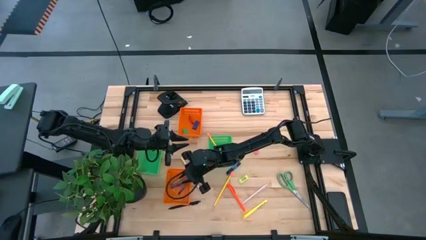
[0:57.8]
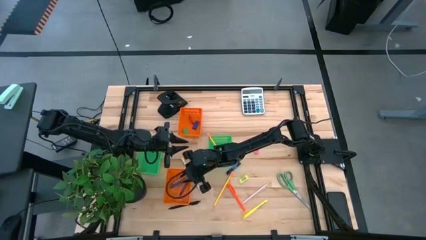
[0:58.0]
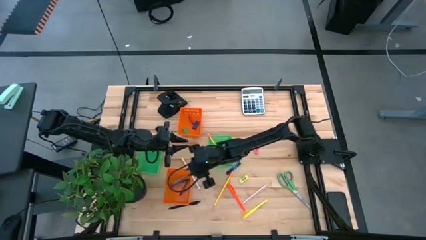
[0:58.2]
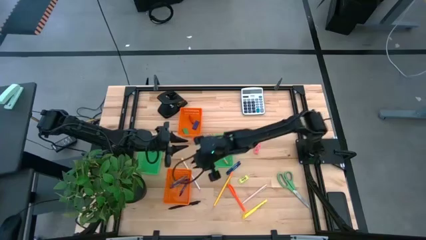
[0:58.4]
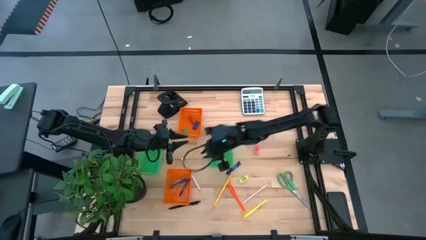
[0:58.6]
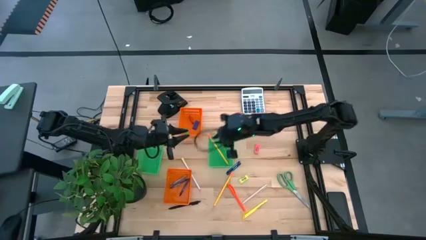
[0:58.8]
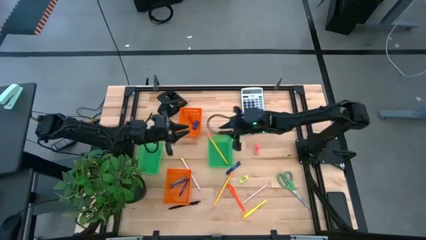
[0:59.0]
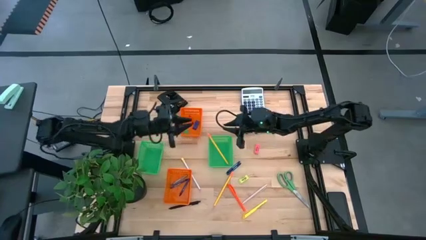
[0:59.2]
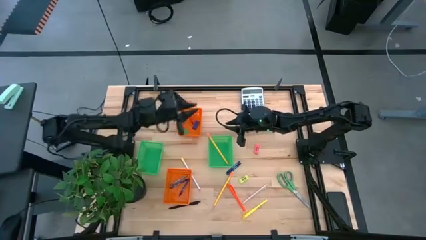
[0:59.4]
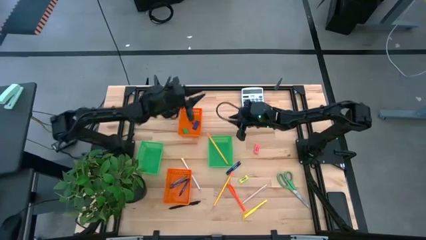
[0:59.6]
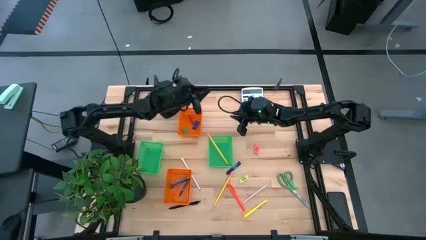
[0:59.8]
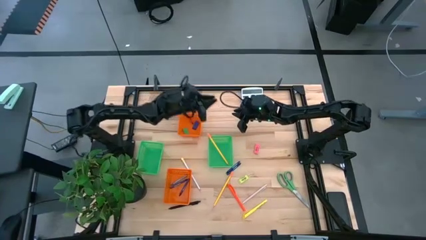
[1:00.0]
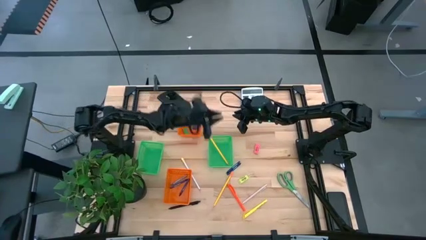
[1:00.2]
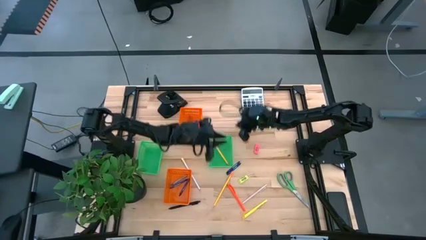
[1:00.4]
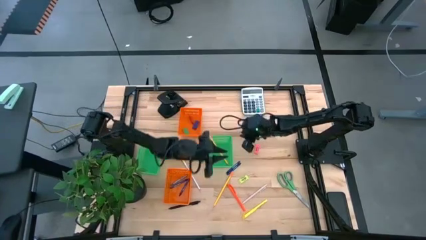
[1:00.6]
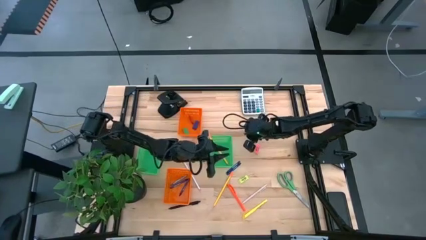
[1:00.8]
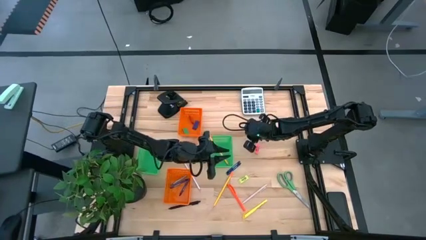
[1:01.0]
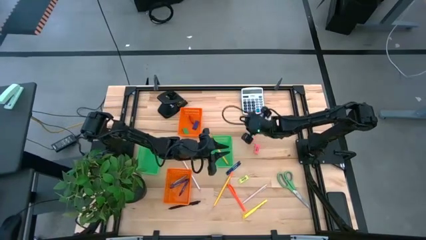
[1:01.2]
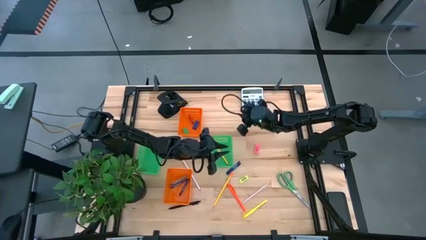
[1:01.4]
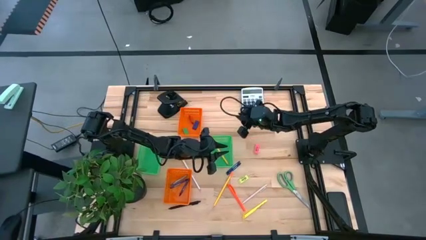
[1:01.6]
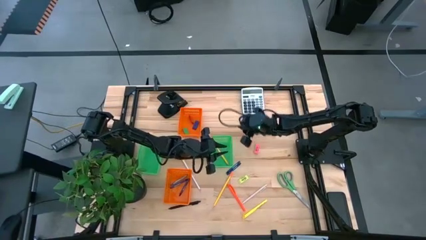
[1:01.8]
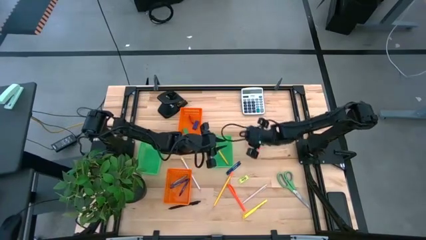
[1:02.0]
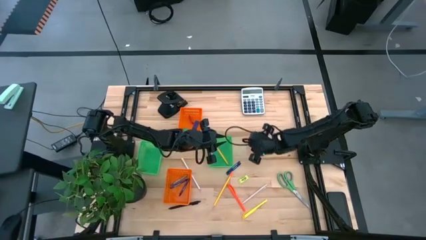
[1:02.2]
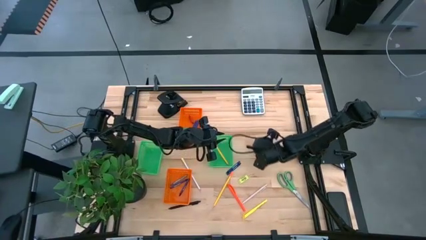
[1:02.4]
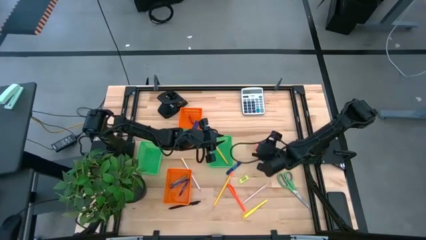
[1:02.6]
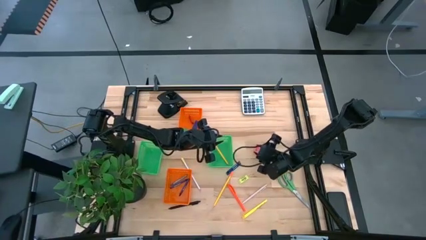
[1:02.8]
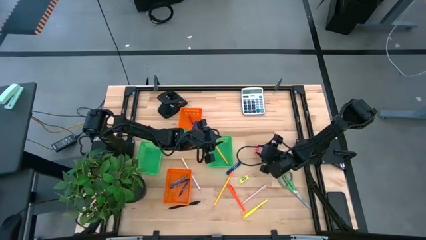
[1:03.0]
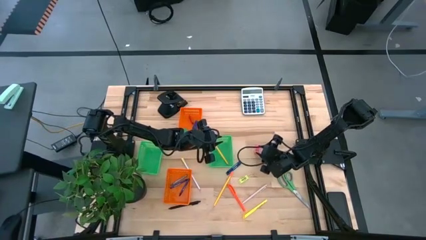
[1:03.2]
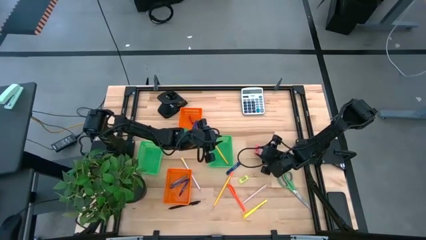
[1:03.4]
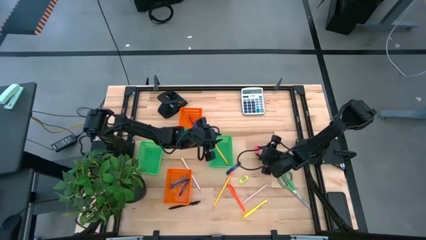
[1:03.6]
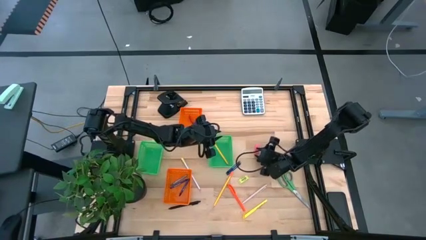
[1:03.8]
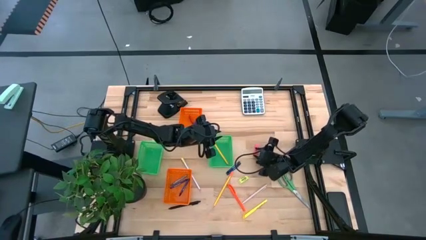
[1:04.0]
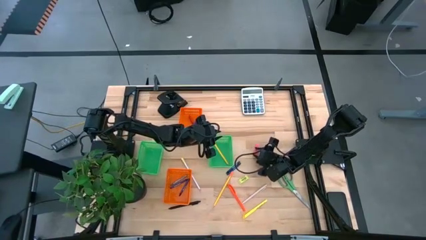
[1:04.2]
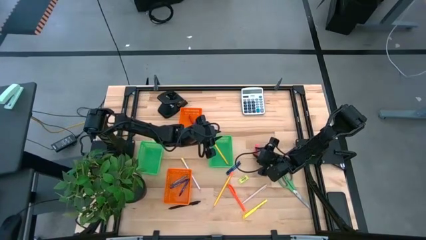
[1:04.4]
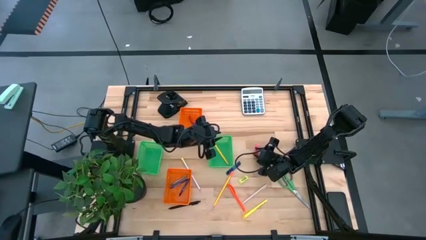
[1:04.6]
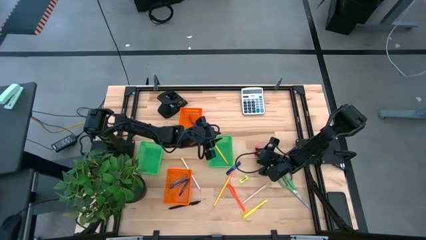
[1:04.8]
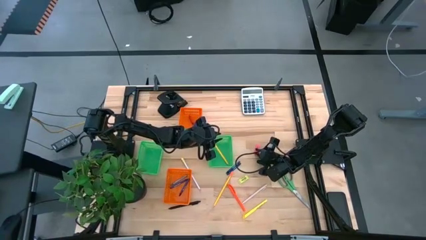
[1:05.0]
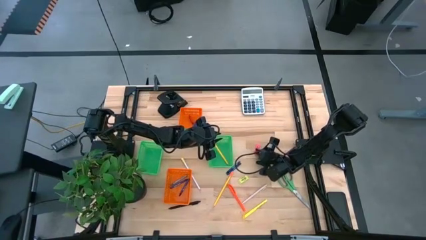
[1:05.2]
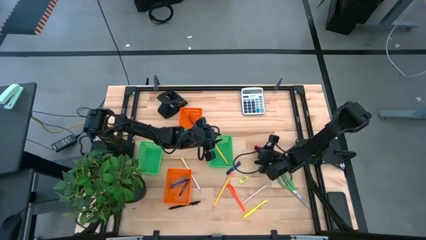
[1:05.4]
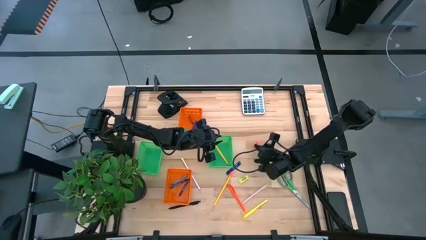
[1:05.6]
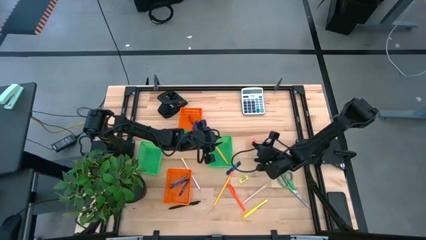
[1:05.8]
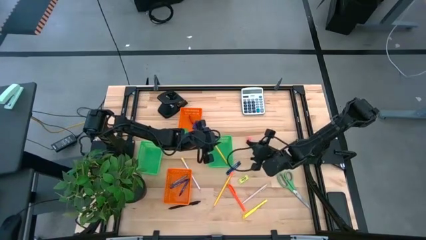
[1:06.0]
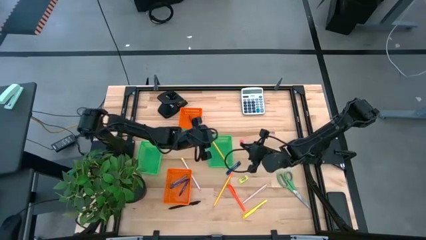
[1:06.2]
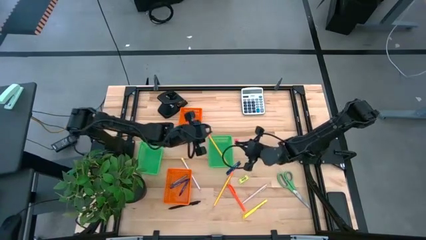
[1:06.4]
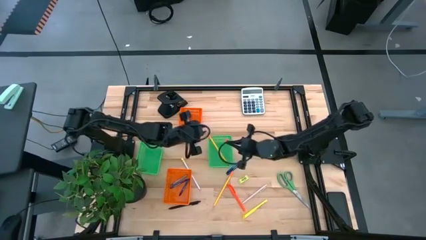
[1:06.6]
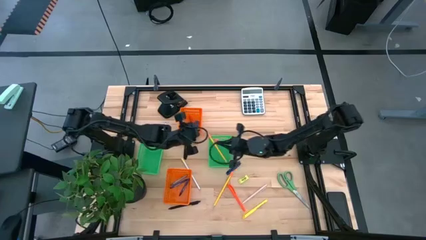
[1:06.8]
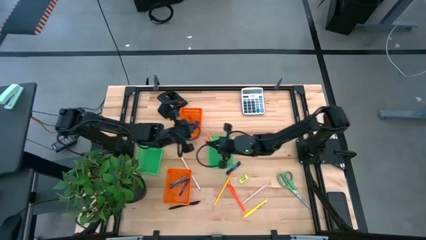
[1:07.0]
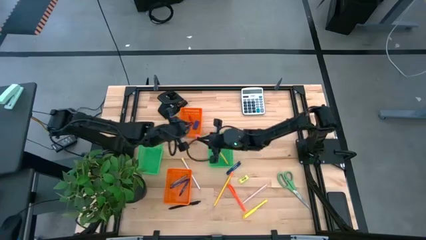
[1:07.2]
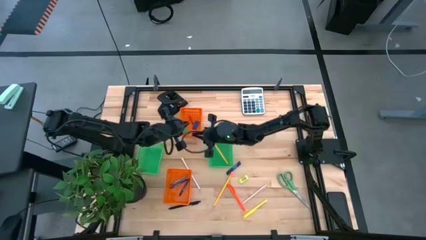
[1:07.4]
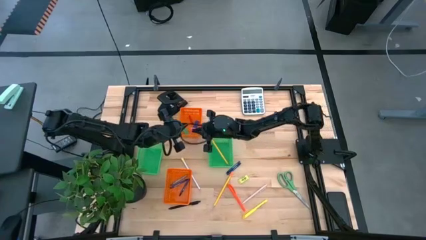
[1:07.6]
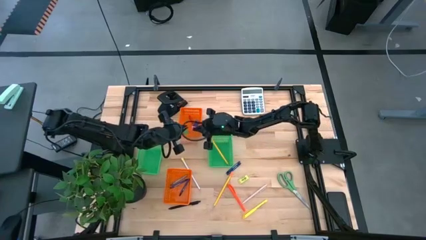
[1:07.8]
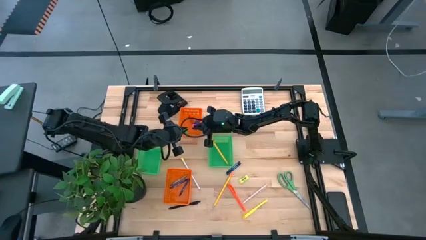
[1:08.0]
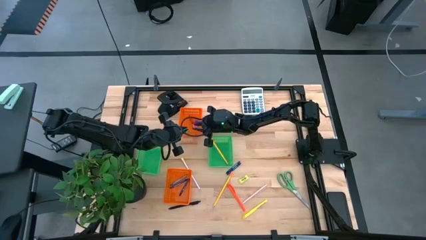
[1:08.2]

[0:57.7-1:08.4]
Task: Sort crayons/erasers/pens/pencils in bins
Put the pink eraser into the top orange basket

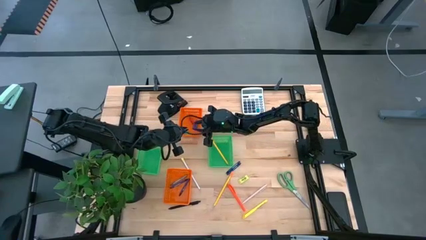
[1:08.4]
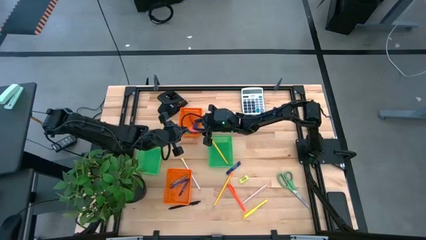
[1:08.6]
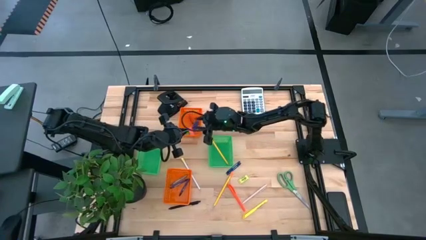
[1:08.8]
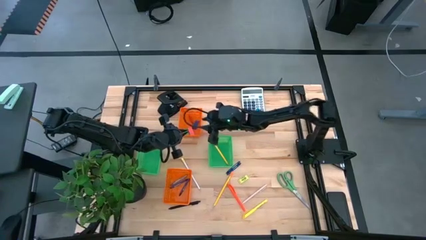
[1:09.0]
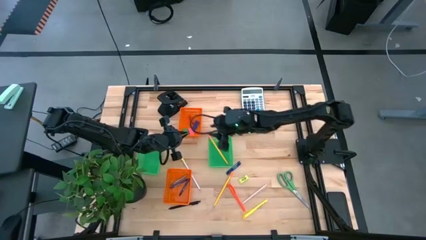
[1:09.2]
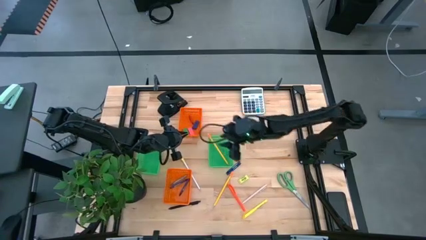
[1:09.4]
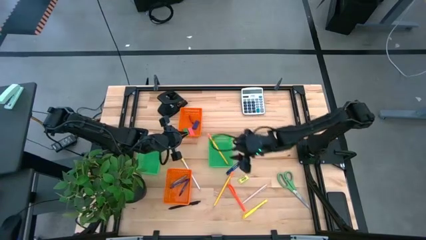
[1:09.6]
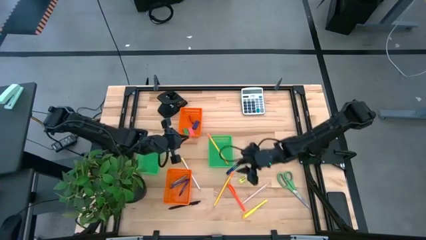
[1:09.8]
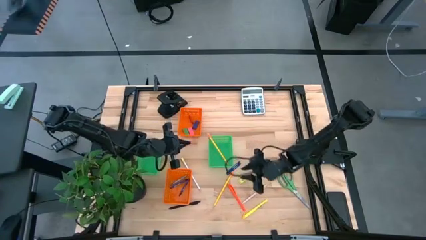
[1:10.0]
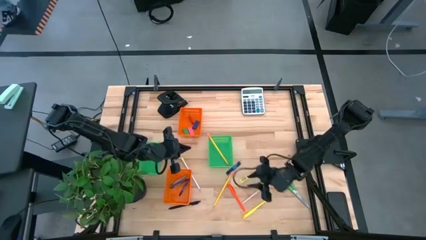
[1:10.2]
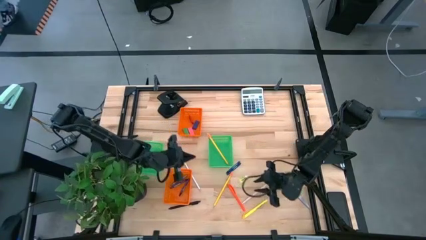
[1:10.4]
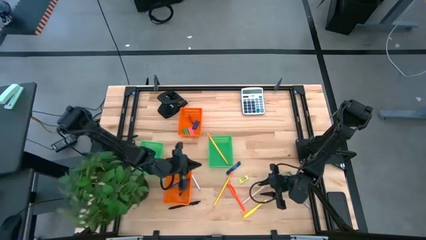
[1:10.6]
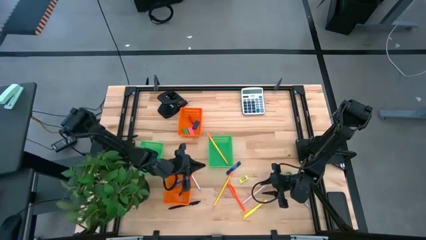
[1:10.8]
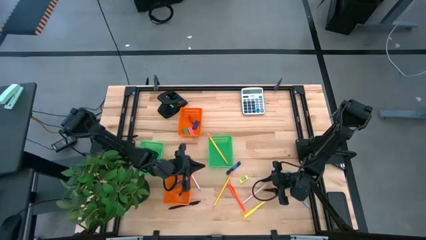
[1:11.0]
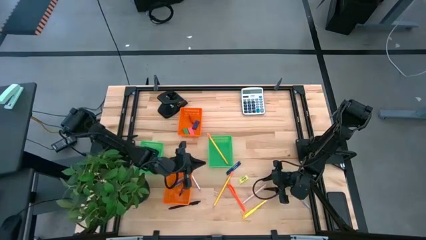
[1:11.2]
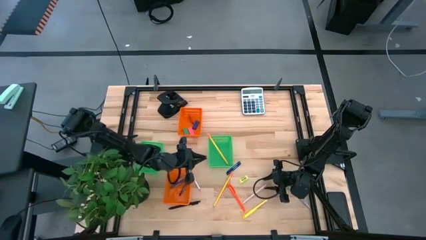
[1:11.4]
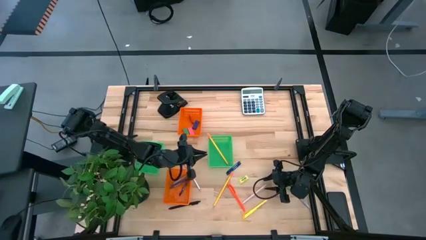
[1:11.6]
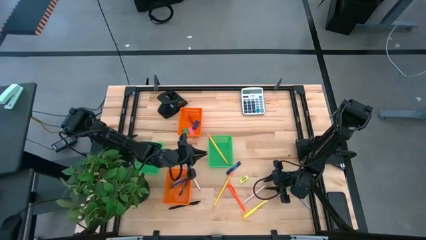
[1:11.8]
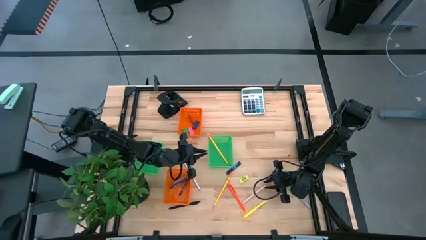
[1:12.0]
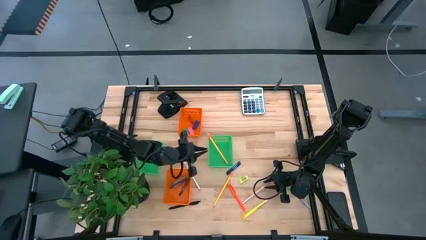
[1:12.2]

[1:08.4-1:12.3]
Put the light brown pen into the left green basket

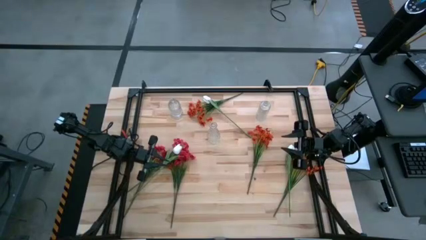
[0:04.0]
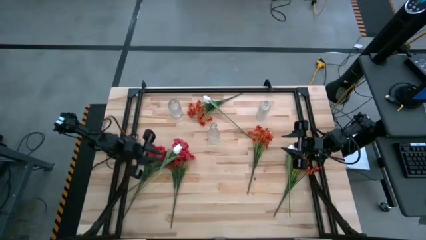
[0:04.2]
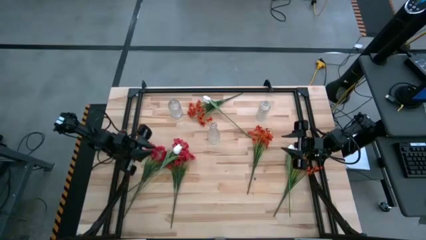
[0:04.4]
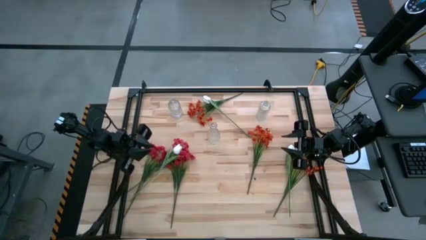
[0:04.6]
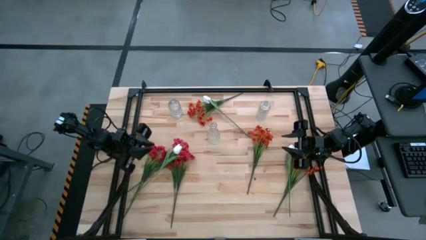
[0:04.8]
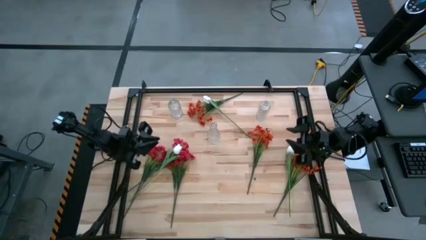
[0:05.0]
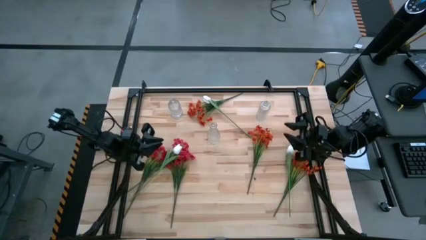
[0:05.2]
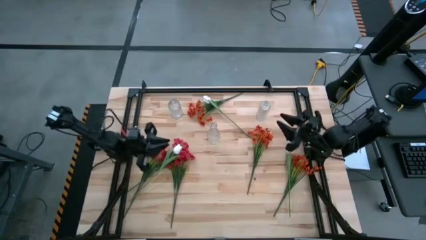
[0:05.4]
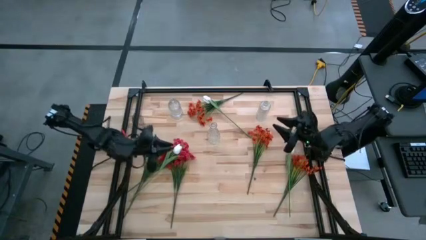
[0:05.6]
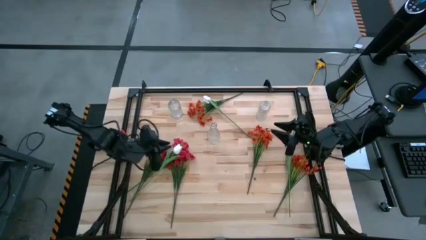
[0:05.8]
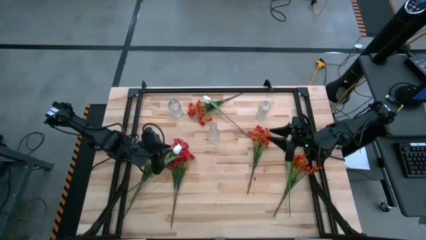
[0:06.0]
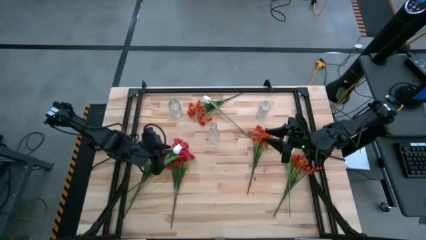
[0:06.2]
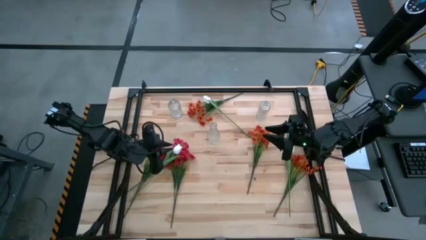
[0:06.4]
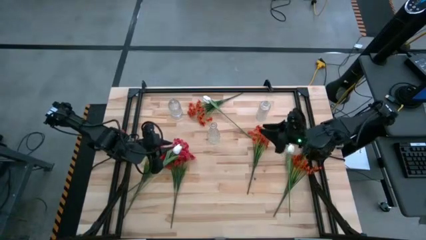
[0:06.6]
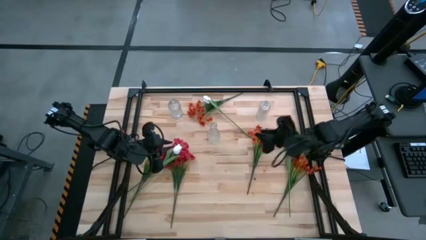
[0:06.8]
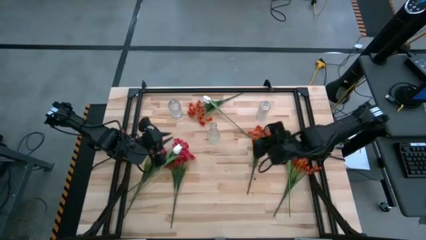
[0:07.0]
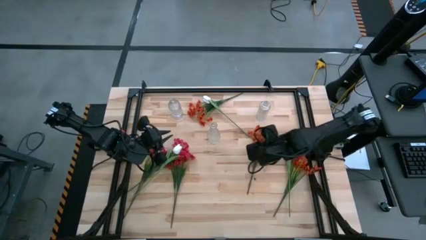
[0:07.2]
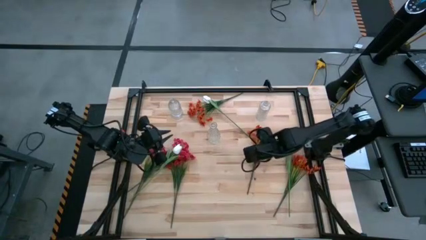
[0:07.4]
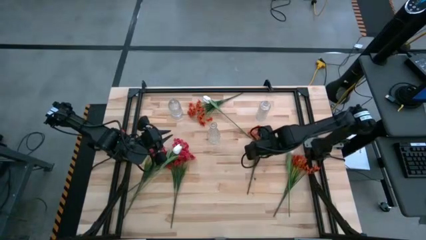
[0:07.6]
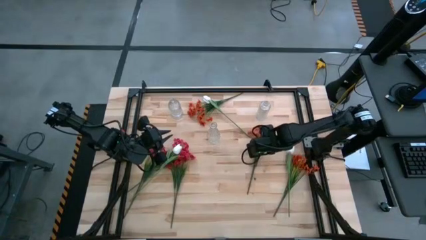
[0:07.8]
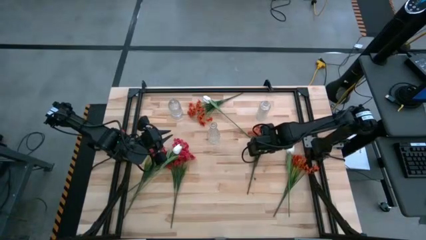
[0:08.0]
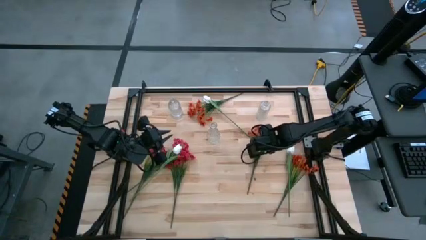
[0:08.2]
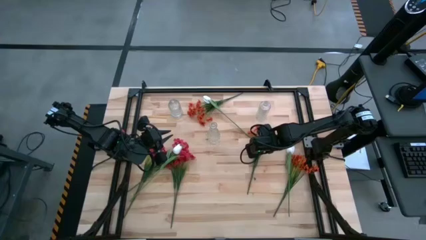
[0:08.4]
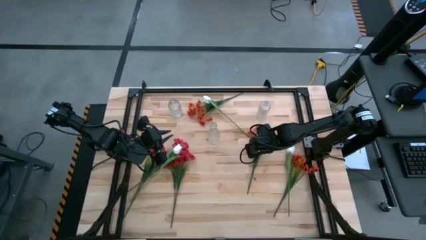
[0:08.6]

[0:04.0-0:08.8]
Task: Sort flowers into vase by color
Put the middle orange flowers into the bottom transparent vase
